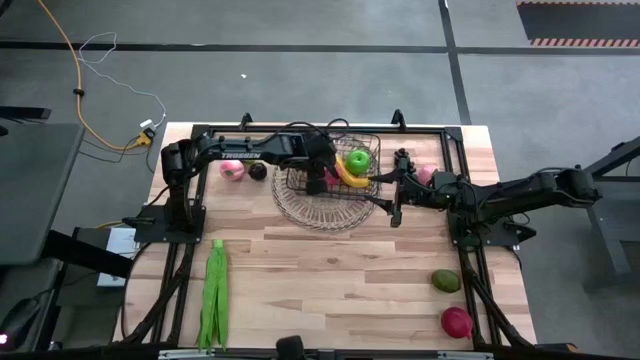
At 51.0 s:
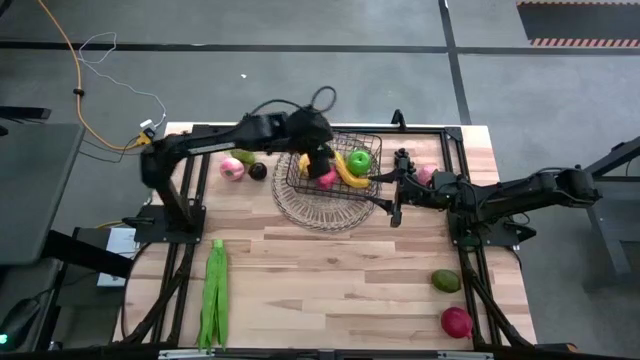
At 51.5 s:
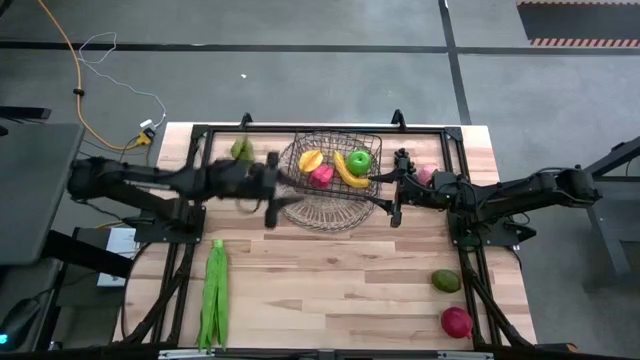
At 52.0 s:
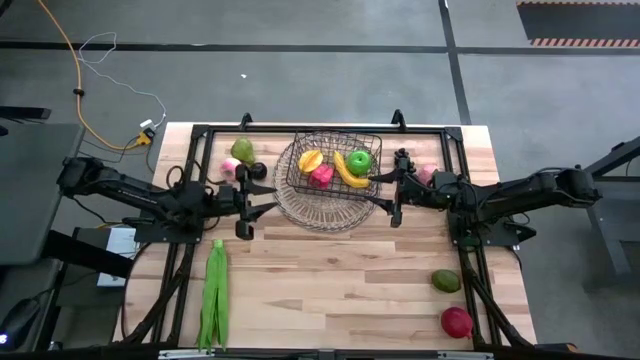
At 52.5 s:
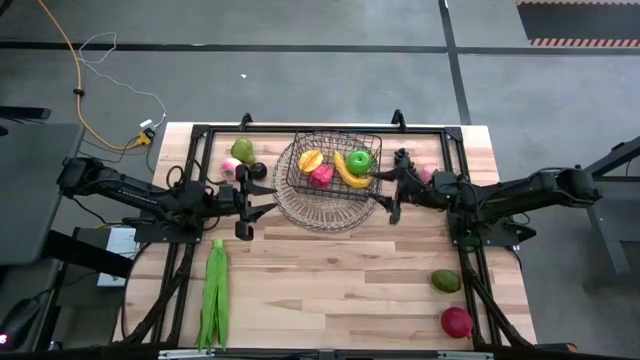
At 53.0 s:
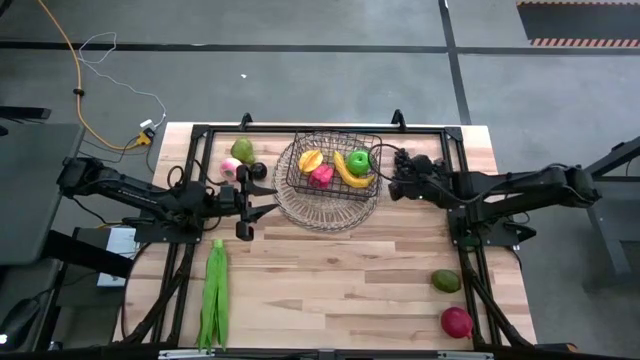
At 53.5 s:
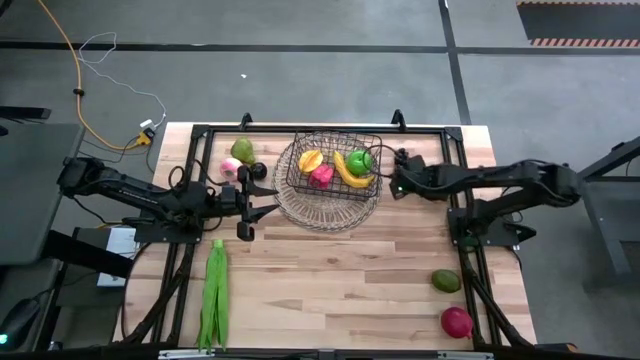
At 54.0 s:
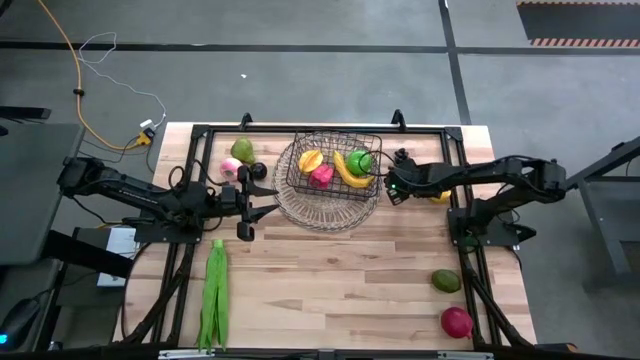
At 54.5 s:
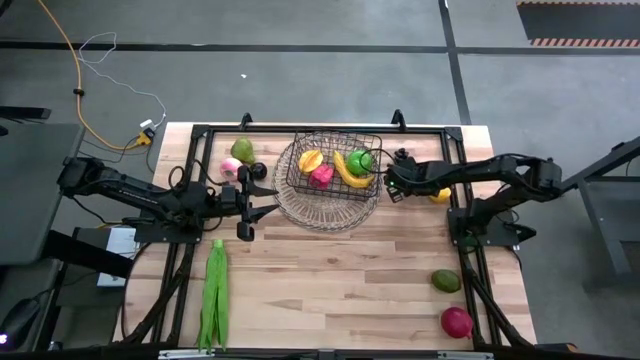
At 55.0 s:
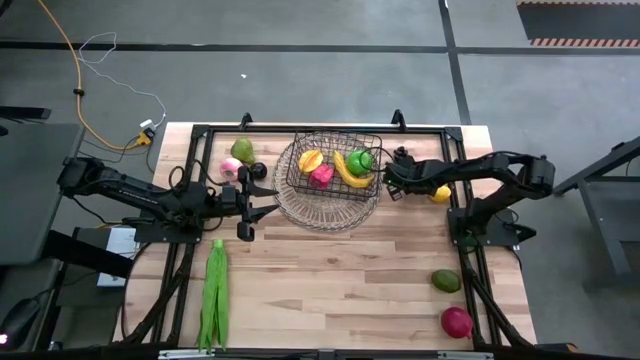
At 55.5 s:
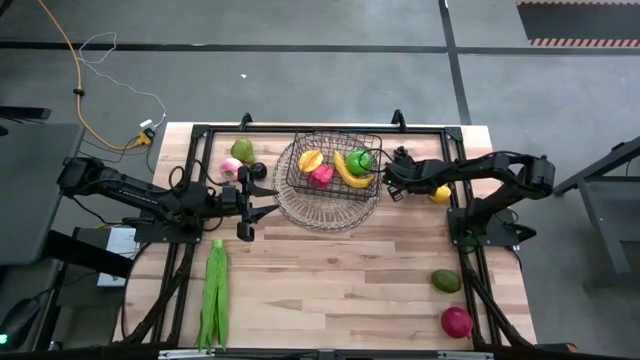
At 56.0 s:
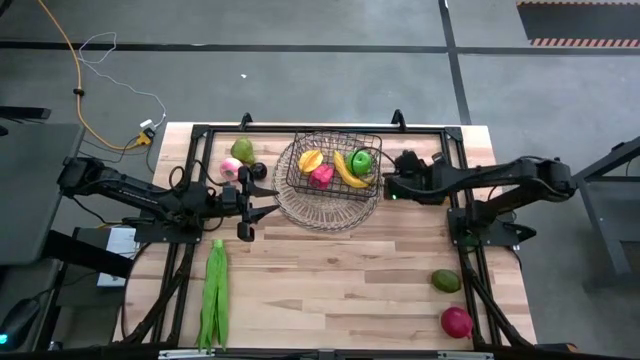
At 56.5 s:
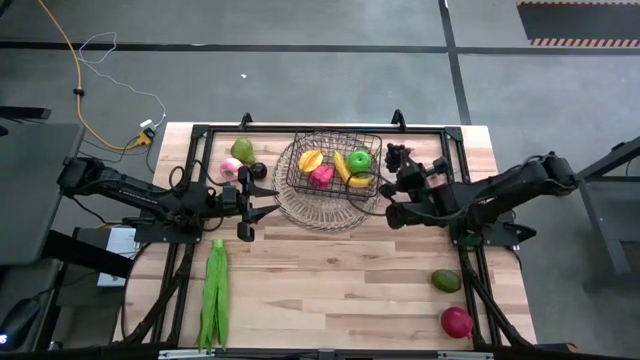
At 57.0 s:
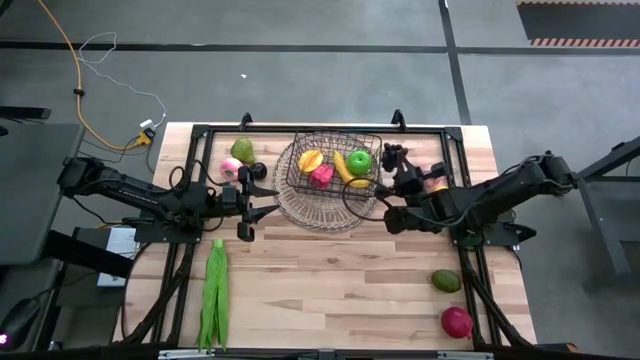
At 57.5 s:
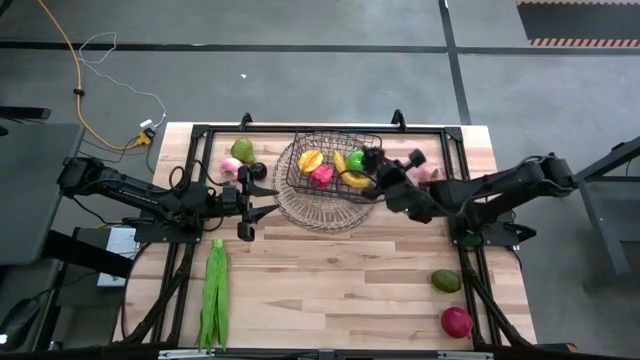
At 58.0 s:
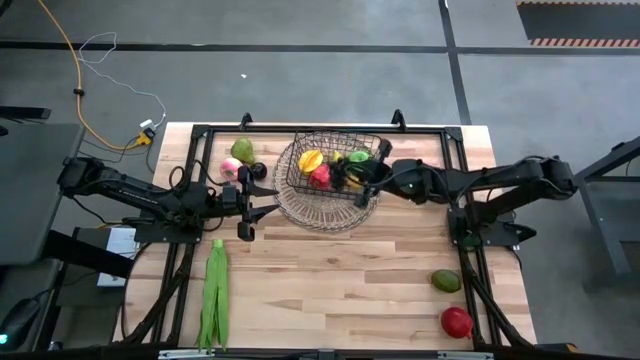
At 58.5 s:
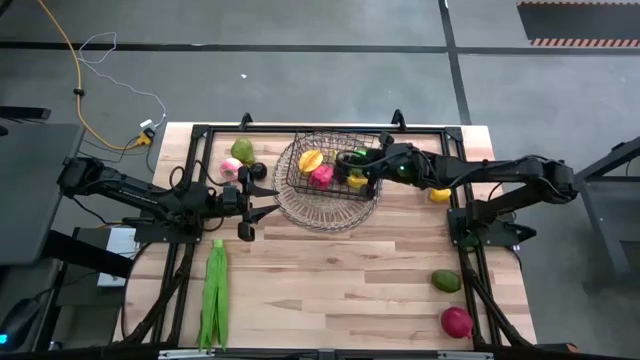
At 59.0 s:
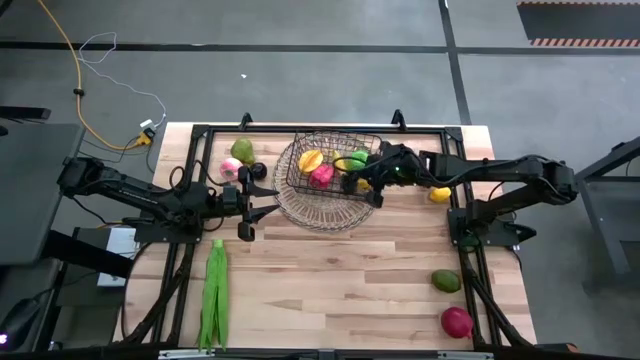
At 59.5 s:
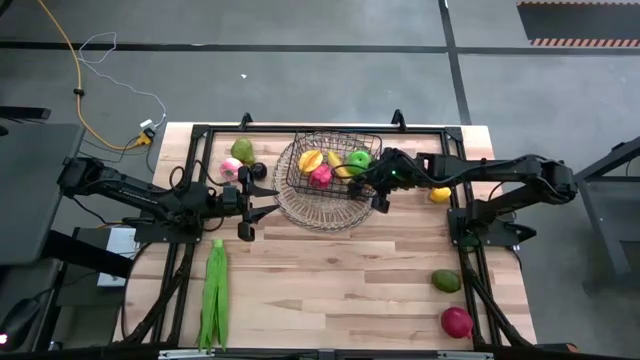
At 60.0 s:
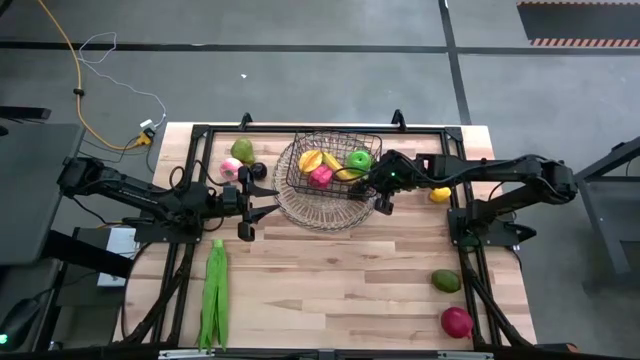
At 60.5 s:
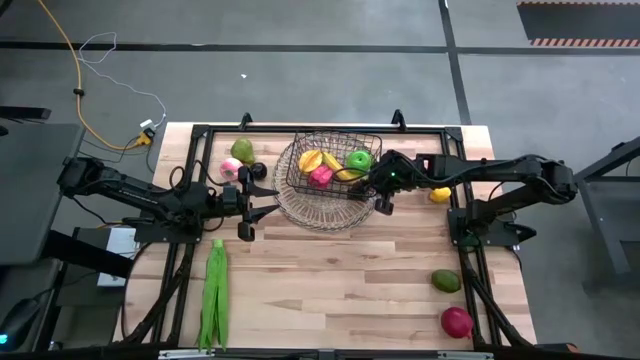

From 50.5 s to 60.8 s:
Task: Build produce basket
Put the grapes into the wire basket

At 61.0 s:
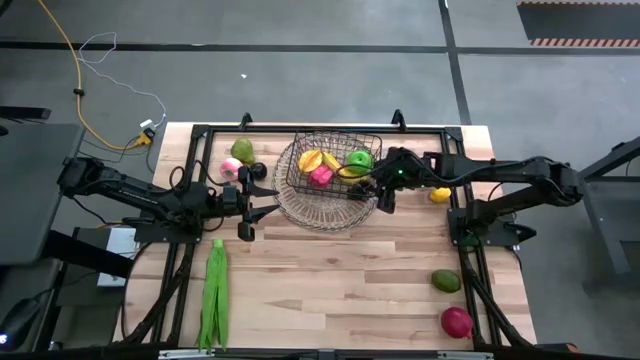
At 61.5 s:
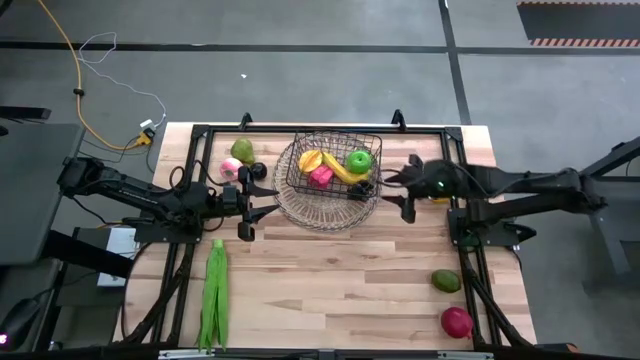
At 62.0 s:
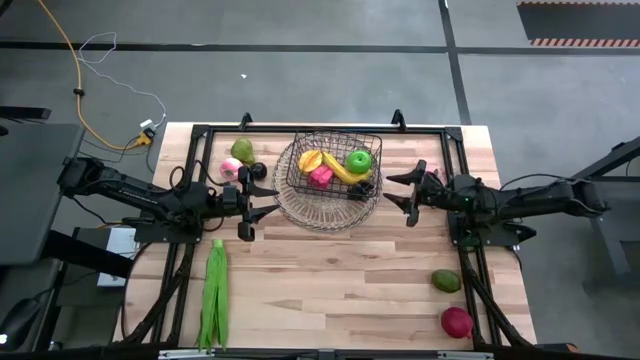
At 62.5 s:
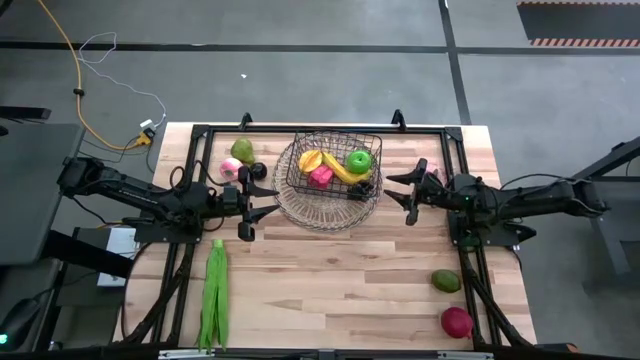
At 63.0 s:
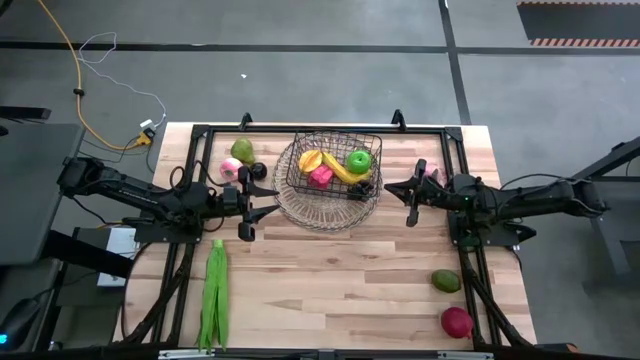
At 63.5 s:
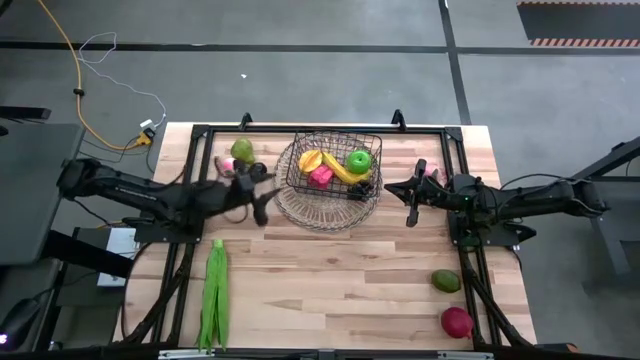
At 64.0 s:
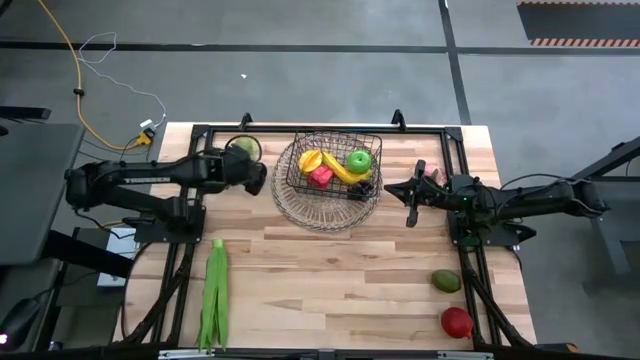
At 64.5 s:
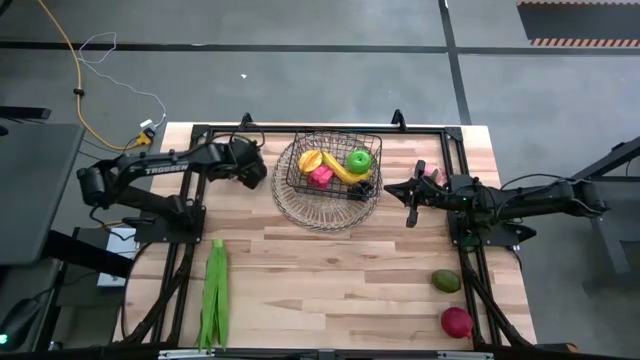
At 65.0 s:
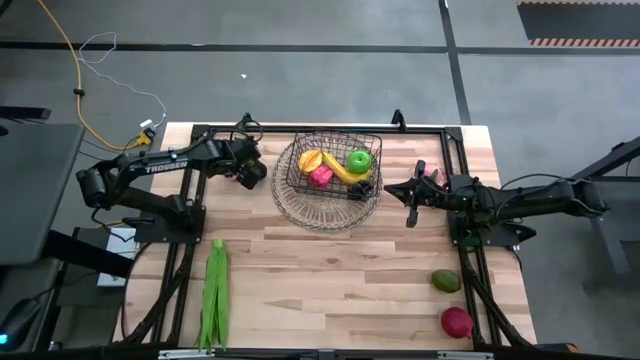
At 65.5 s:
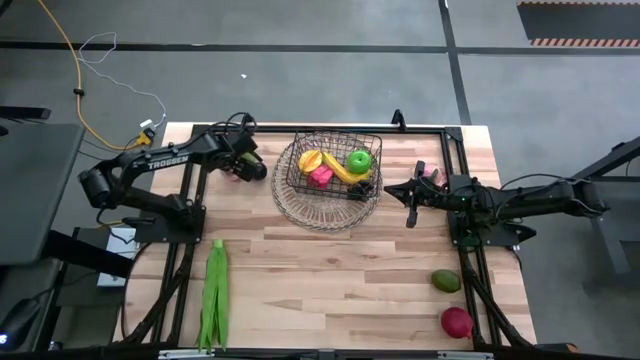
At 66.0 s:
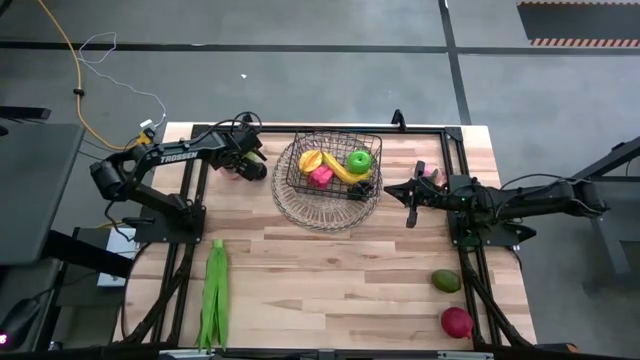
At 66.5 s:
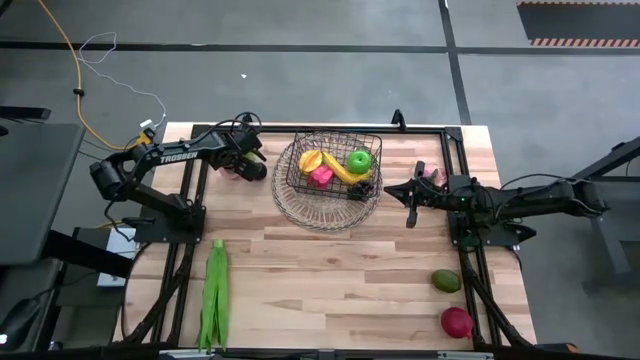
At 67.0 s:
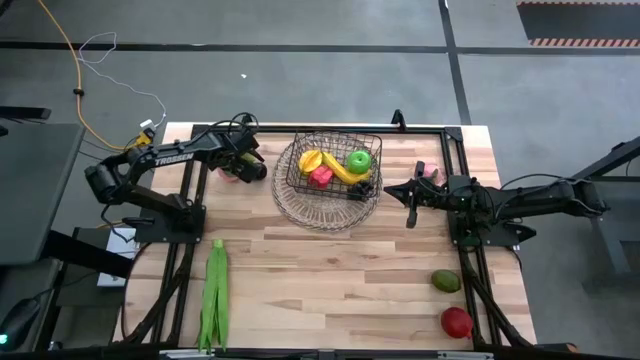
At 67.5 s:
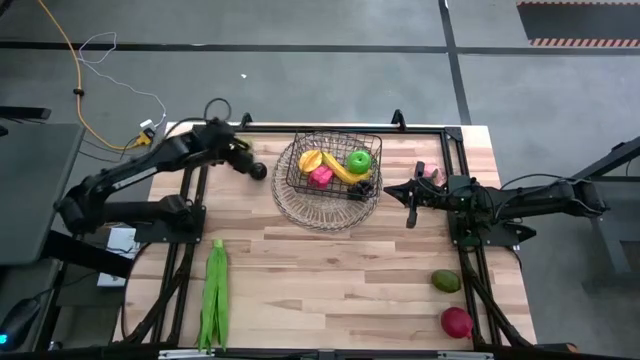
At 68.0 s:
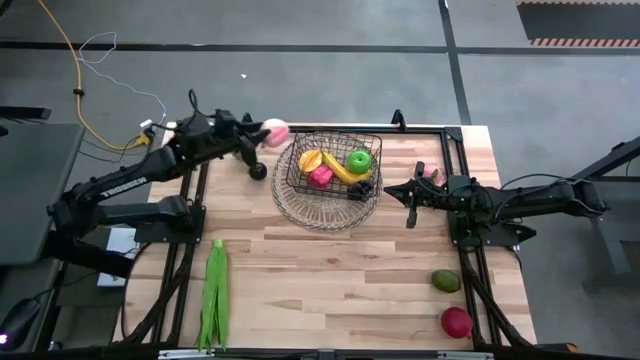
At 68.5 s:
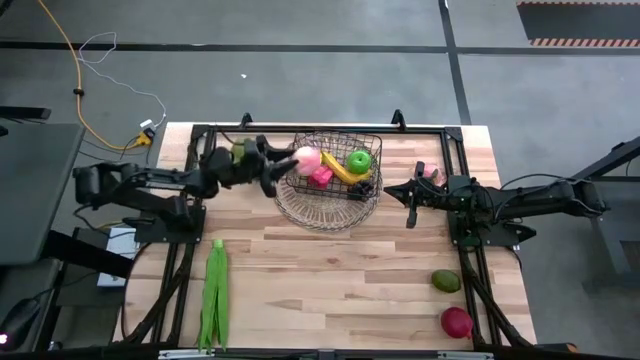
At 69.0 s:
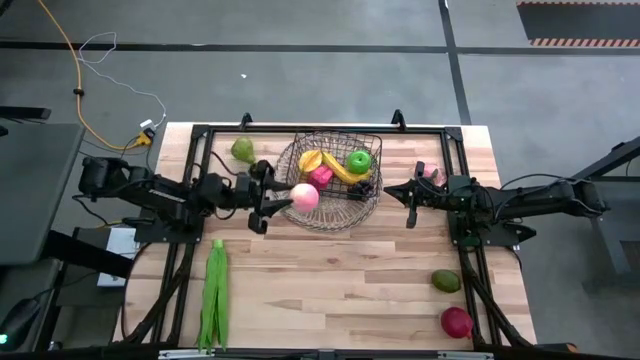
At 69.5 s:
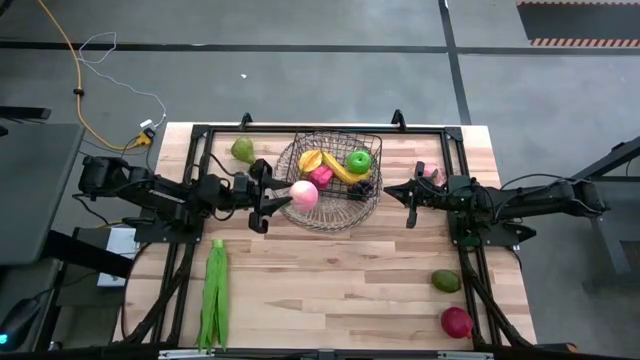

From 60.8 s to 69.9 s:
Put the left peach into the wire basket
